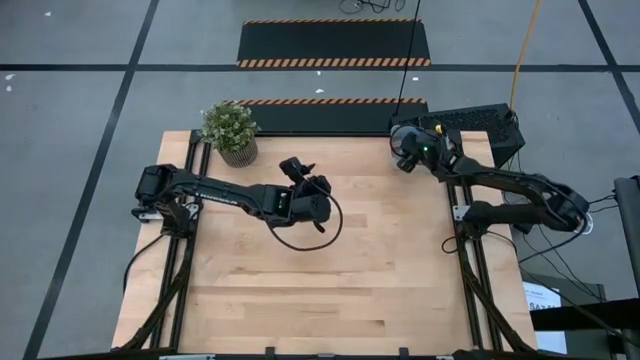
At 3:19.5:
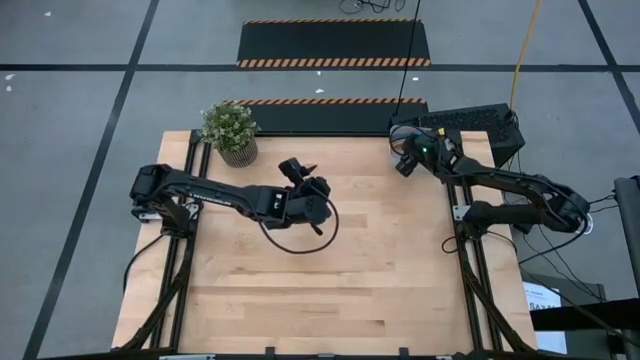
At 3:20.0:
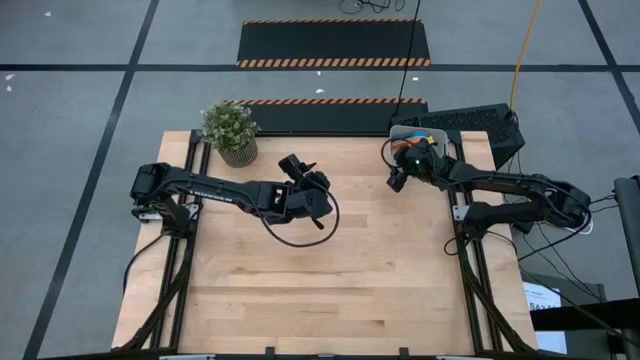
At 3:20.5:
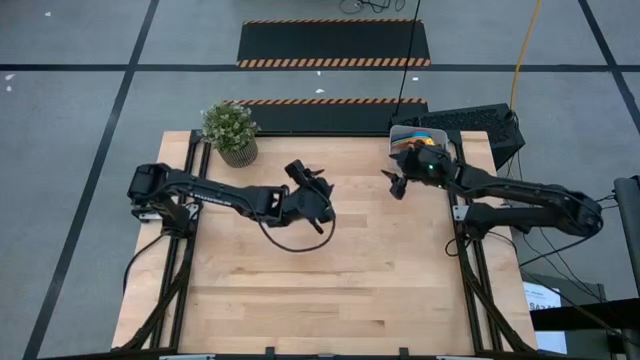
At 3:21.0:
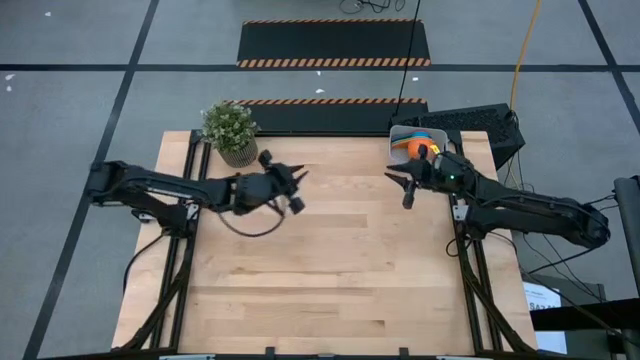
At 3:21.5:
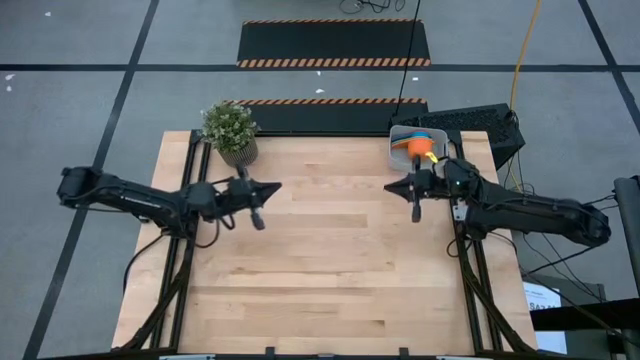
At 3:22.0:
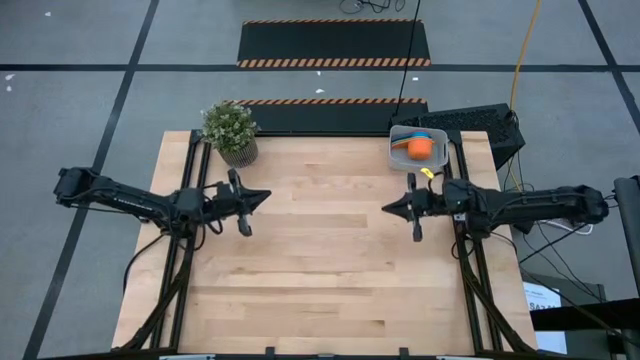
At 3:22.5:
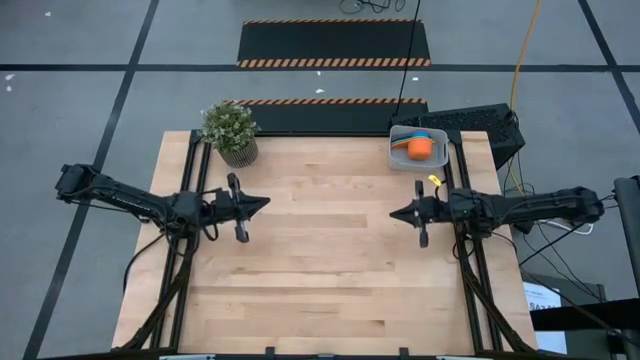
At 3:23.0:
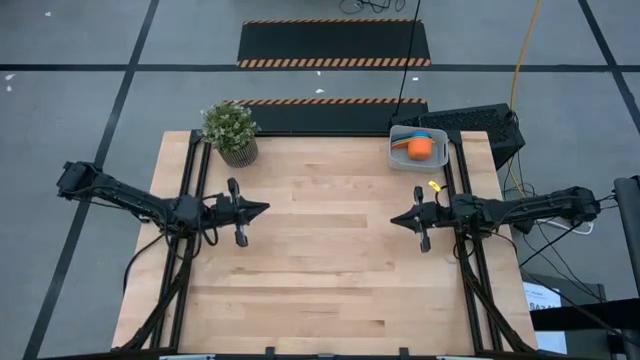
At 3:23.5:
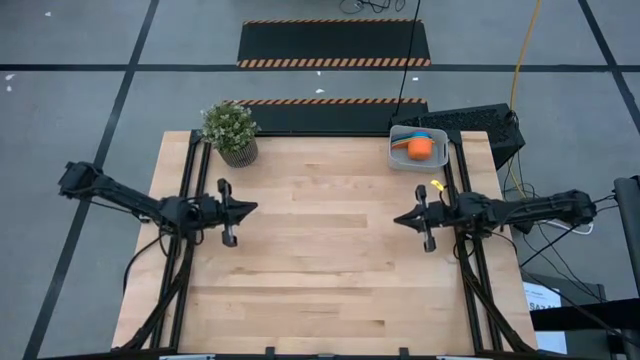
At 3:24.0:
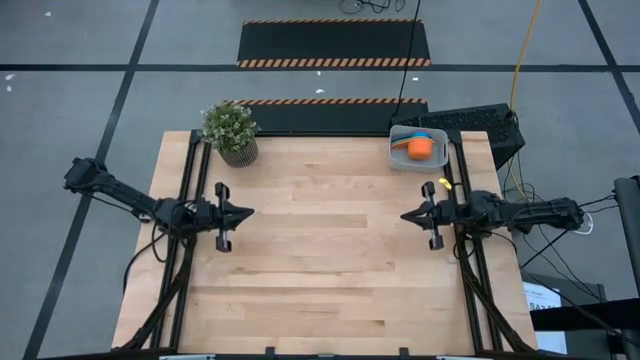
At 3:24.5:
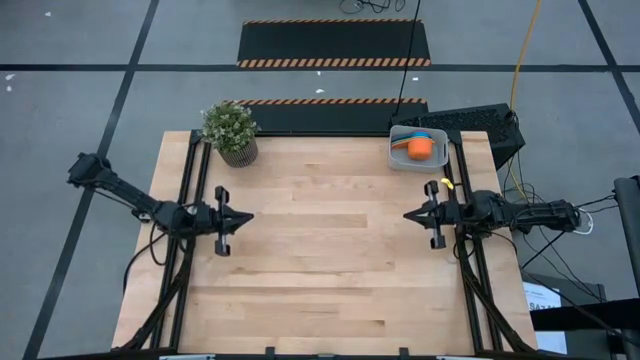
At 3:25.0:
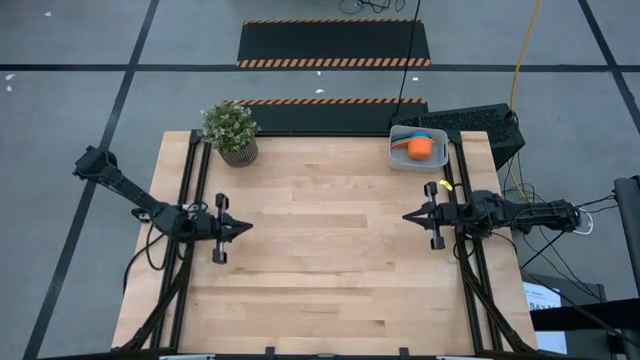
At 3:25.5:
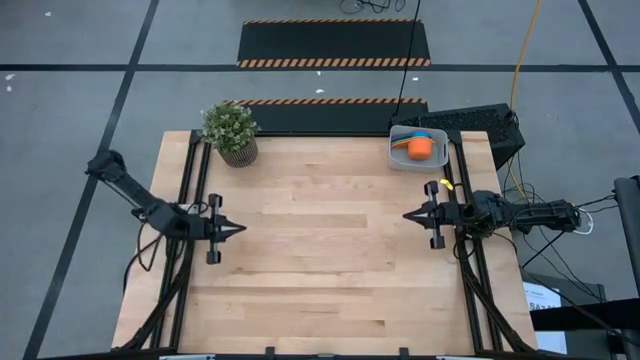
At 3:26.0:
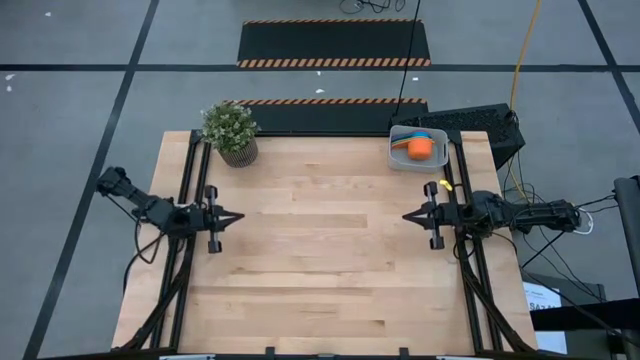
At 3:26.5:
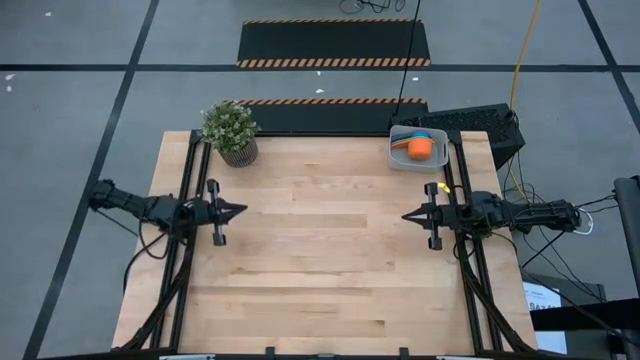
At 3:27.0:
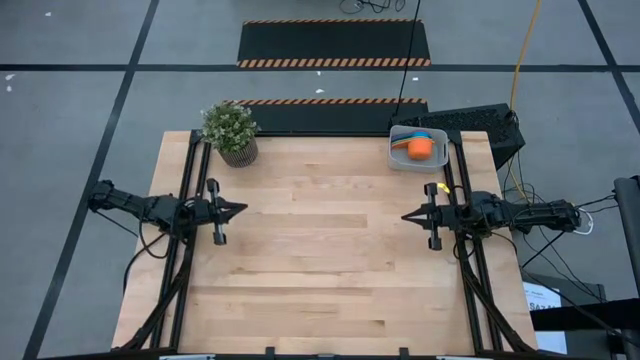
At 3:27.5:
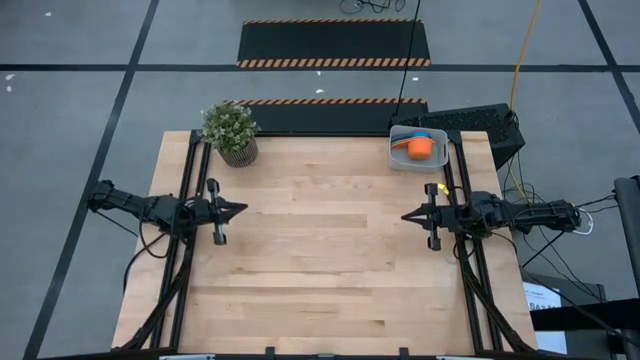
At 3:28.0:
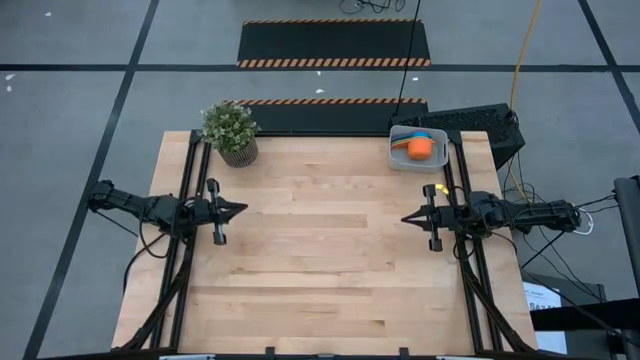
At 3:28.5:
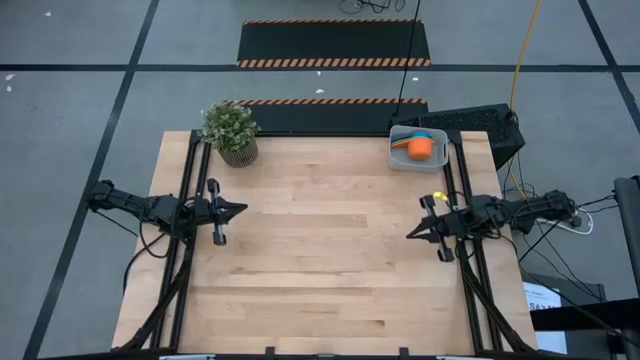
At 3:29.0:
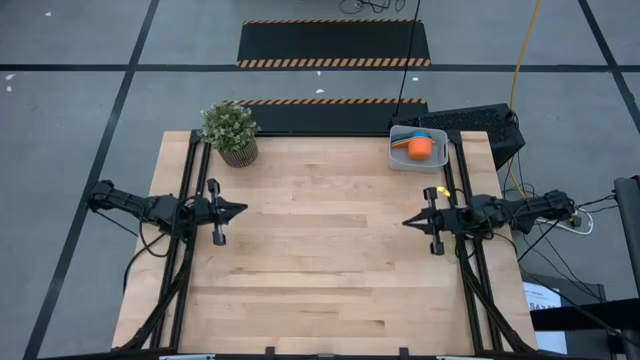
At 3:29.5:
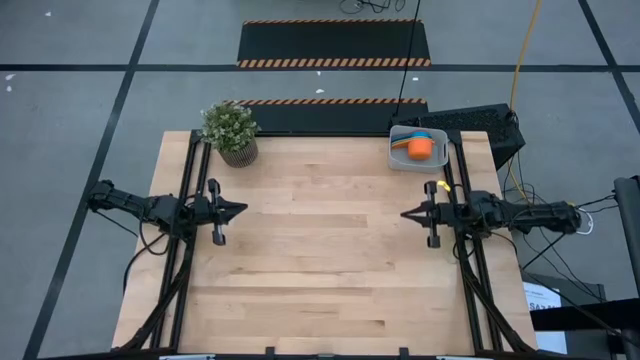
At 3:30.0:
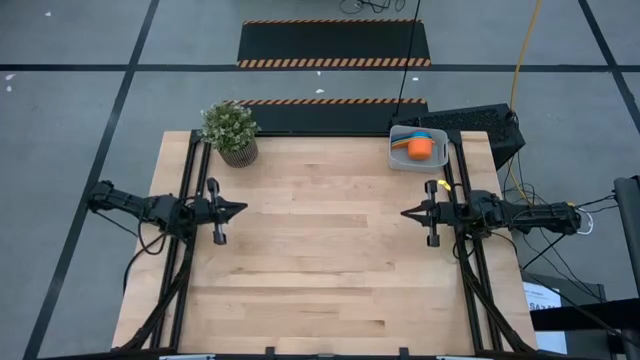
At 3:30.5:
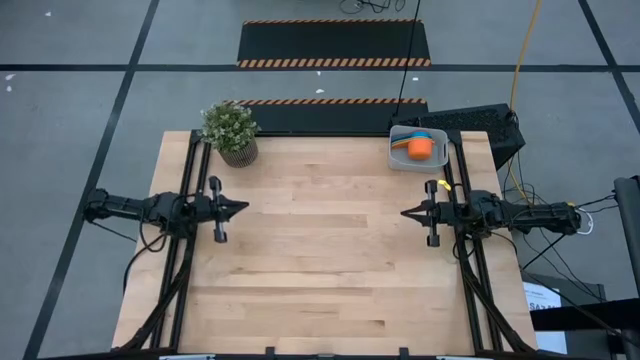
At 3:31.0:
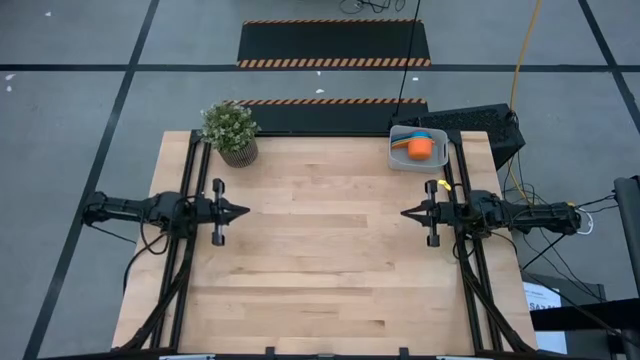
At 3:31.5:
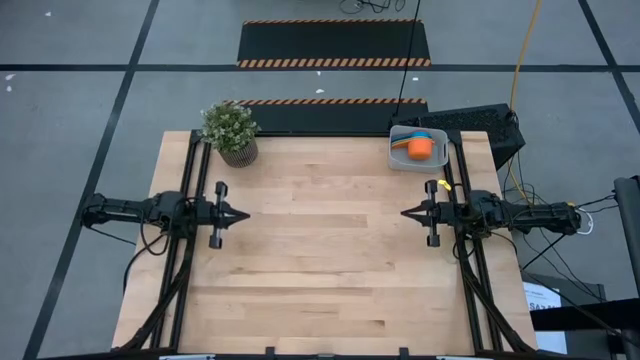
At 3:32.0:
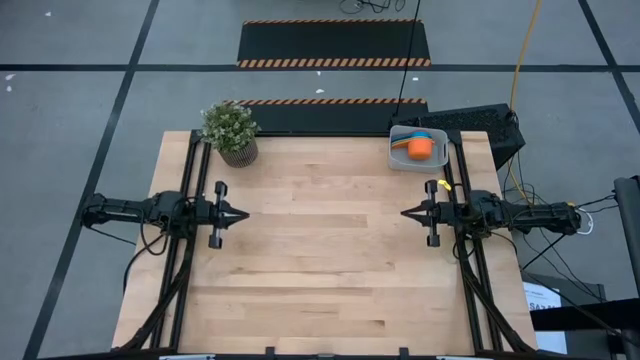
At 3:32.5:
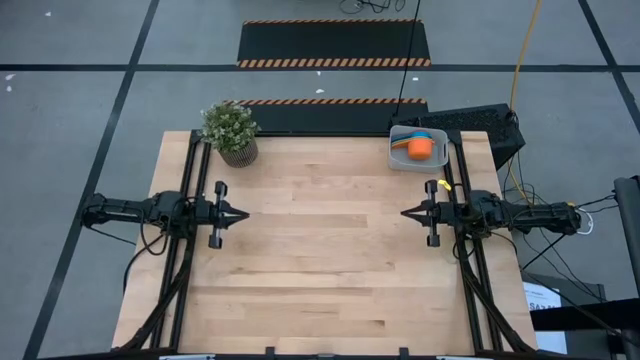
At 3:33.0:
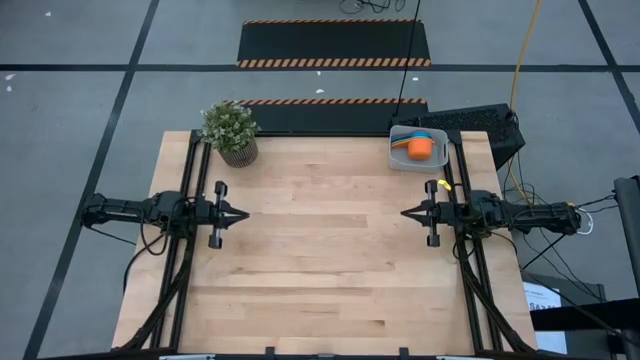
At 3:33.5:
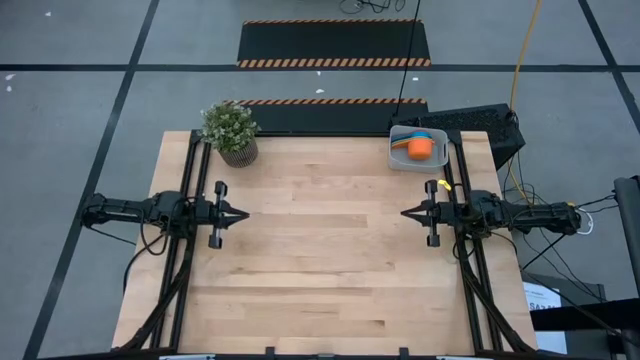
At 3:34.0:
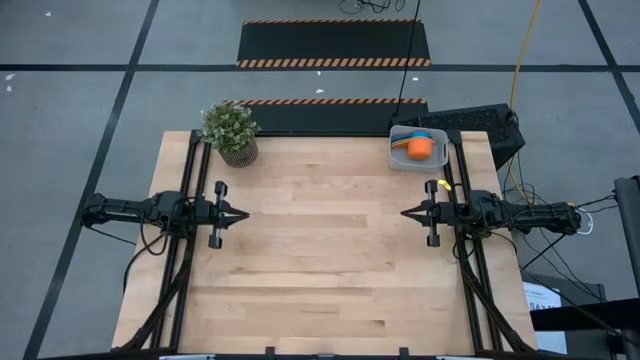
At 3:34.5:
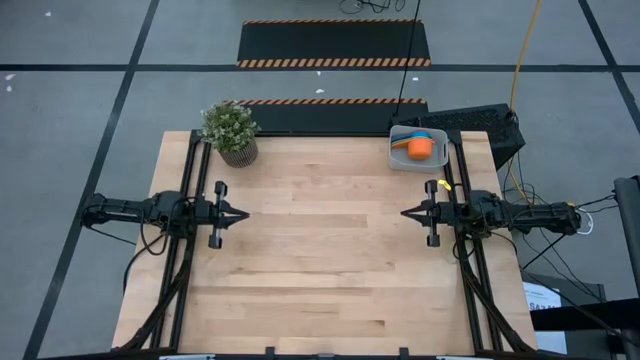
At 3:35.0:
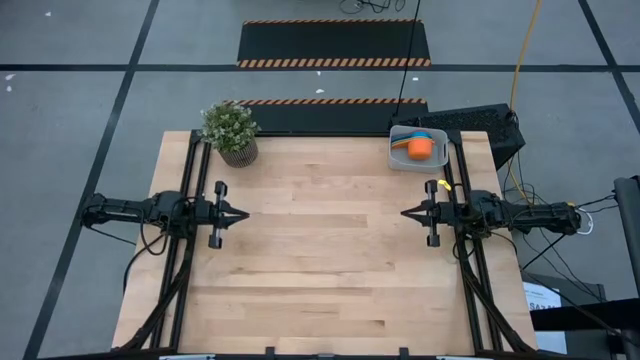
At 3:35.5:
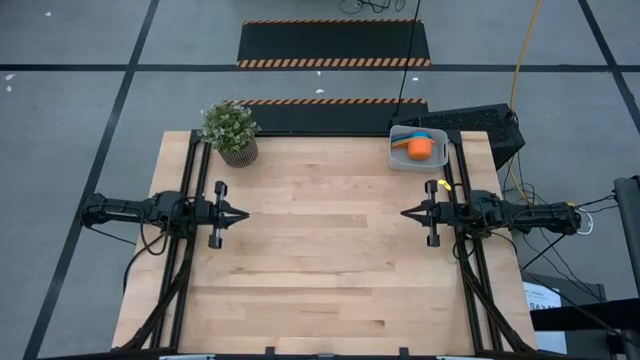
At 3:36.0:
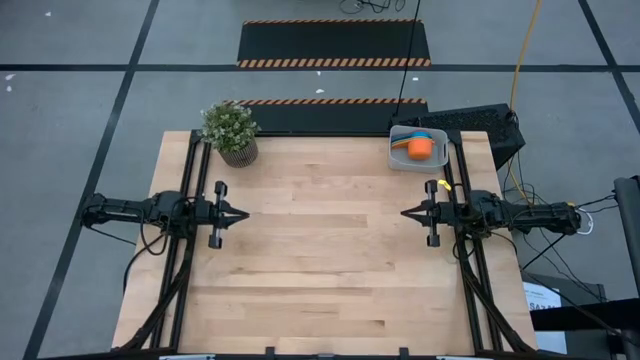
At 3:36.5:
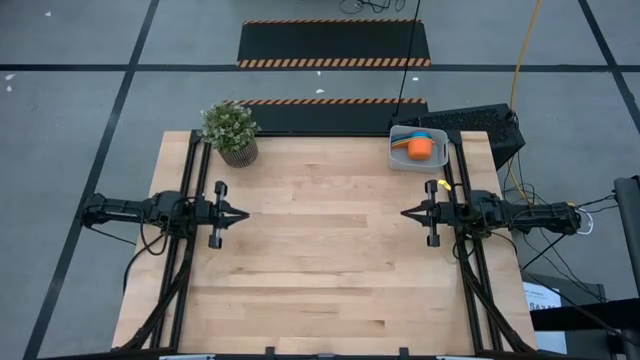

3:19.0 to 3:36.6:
Task: Nest measuring cups in basket
Return to Home Position

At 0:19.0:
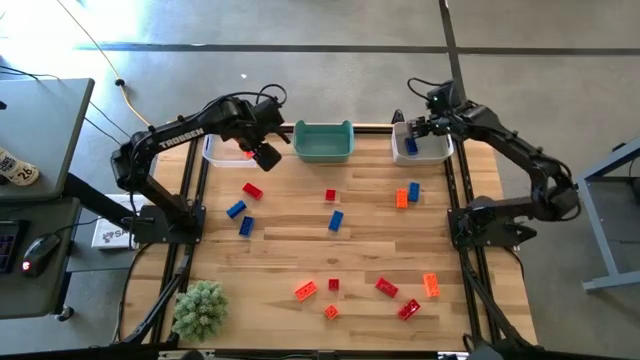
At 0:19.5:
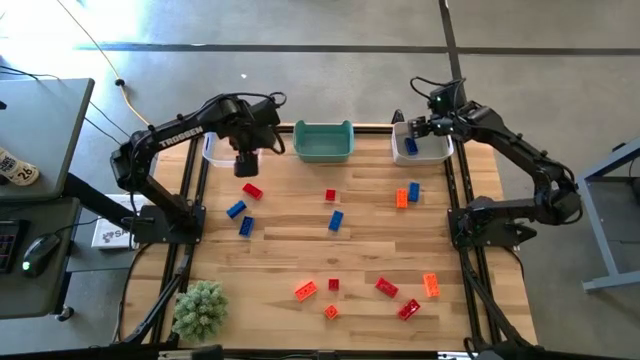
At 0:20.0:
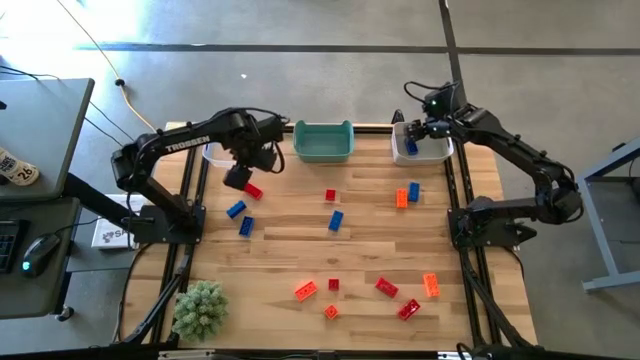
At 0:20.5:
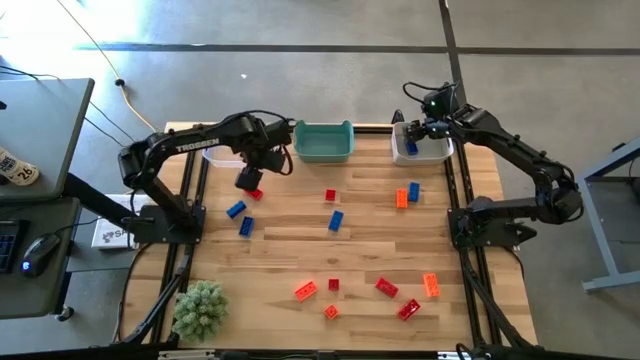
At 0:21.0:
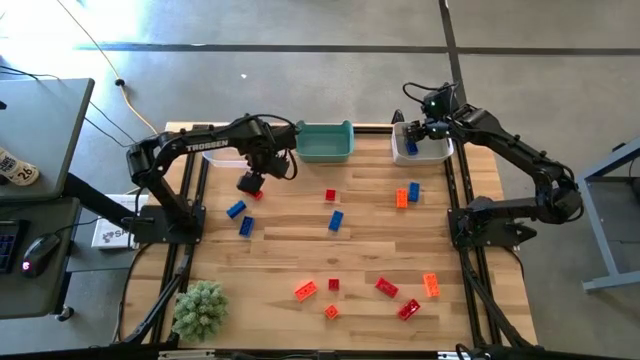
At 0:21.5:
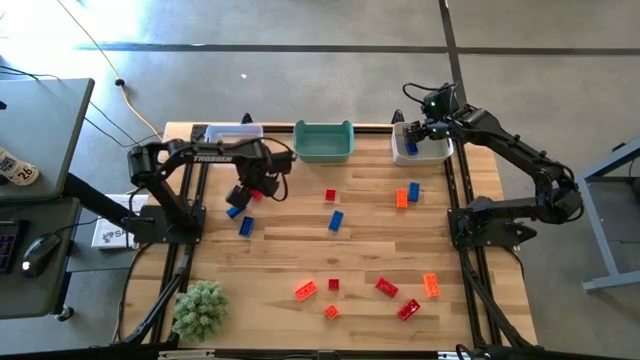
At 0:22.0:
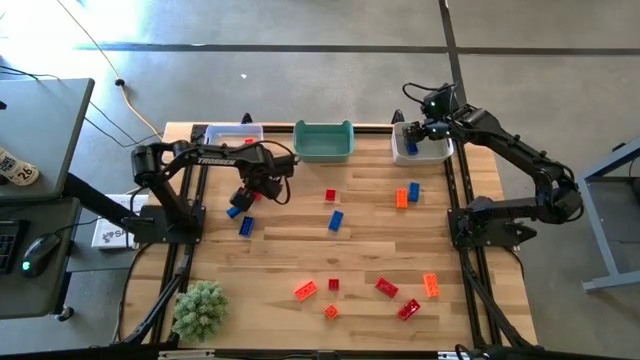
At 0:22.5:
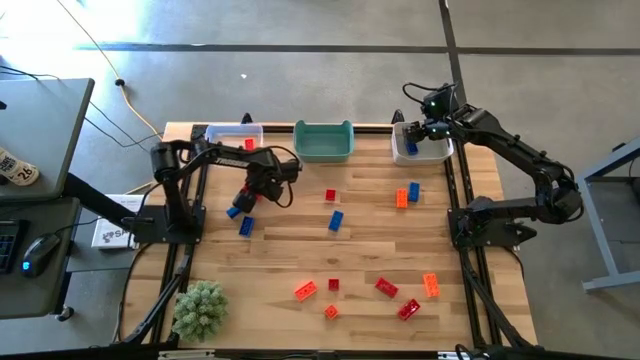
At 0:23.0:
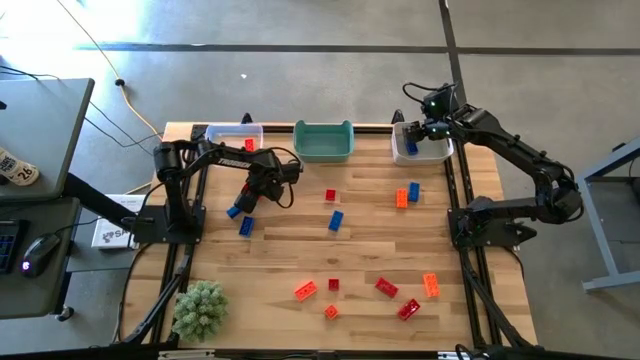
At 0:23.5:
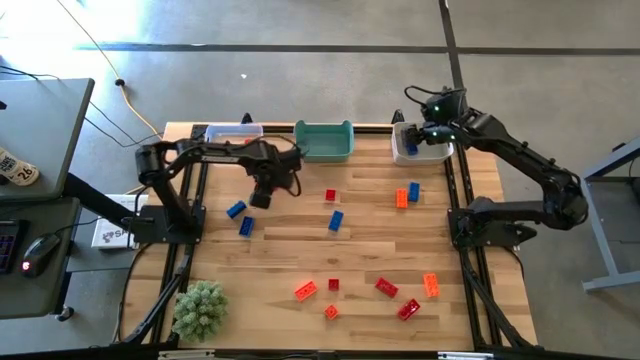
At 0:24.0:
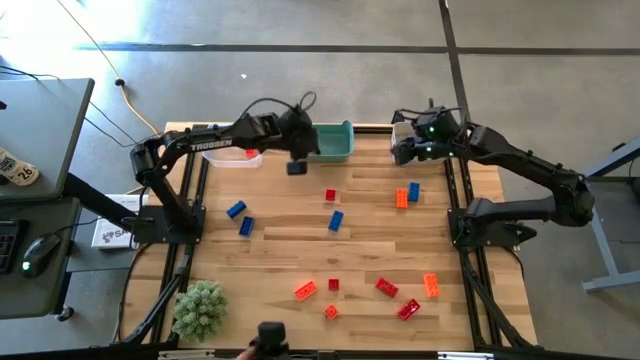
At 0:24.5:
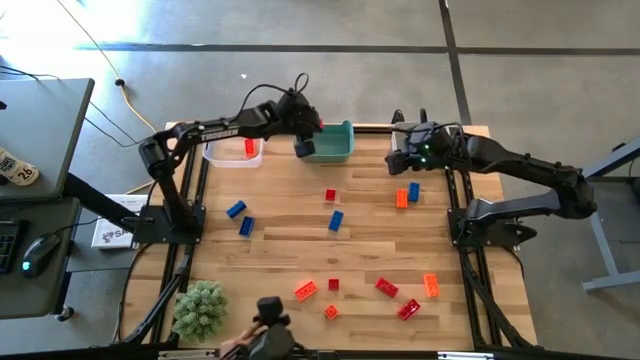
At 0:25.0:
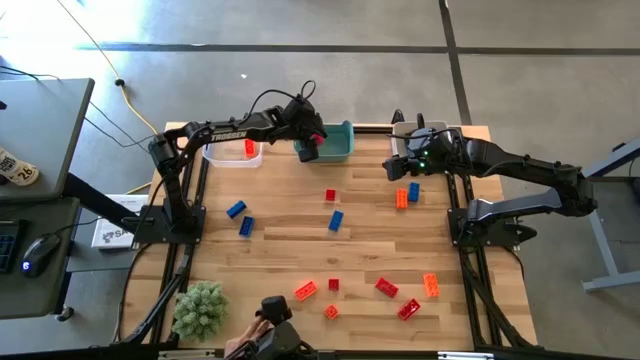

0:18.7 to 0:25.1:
Task: Sort & place blocks by color
Put the red game piece into the green bin
